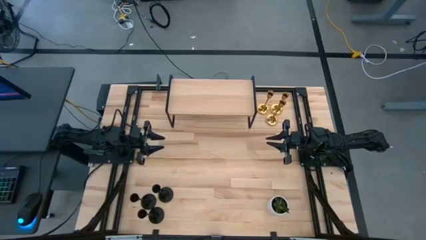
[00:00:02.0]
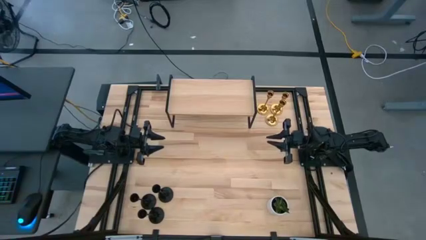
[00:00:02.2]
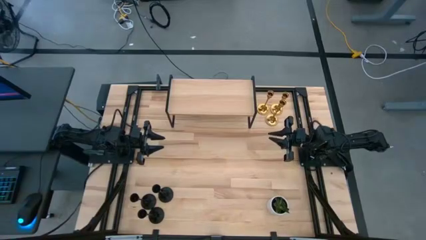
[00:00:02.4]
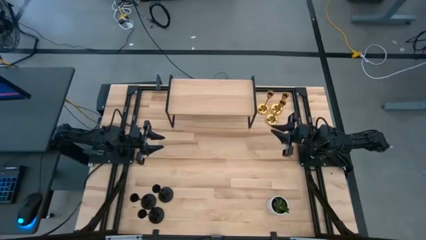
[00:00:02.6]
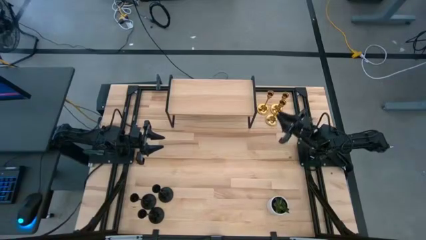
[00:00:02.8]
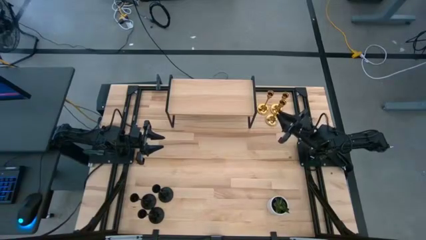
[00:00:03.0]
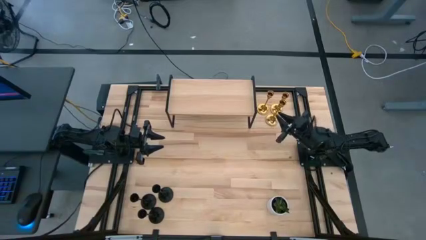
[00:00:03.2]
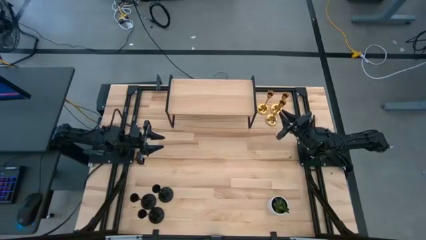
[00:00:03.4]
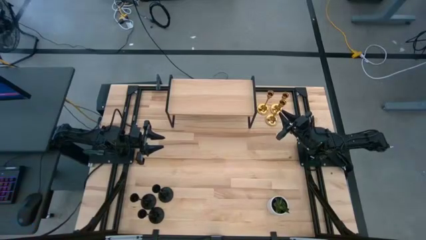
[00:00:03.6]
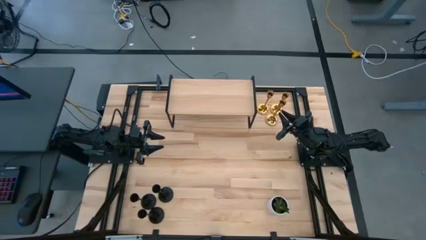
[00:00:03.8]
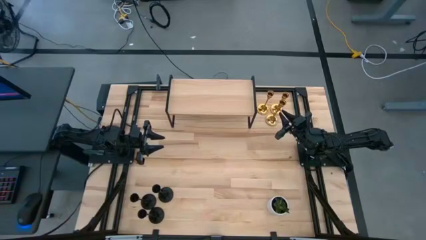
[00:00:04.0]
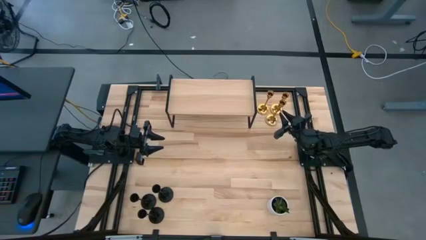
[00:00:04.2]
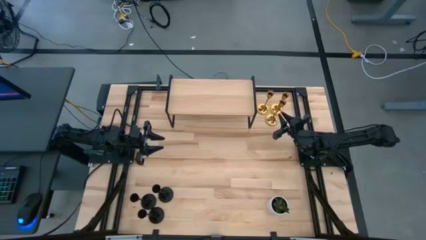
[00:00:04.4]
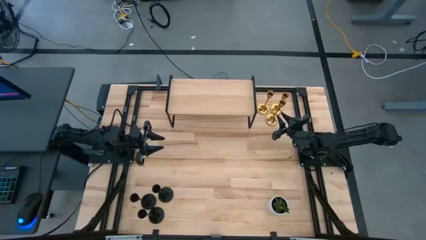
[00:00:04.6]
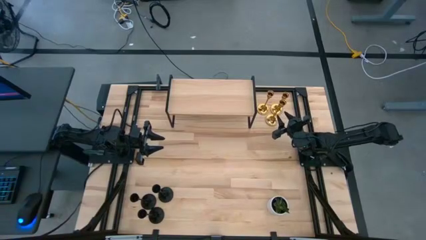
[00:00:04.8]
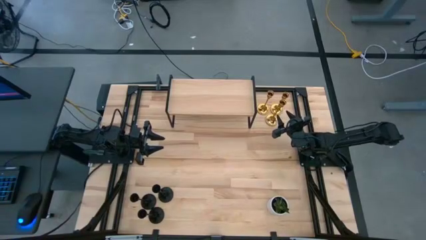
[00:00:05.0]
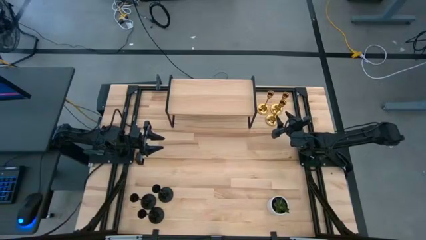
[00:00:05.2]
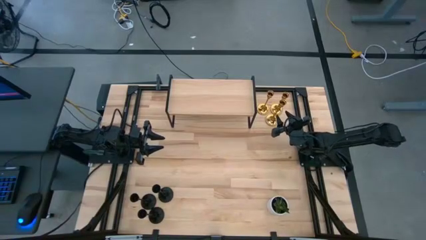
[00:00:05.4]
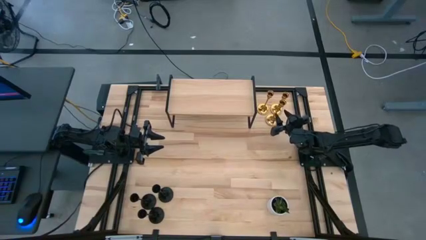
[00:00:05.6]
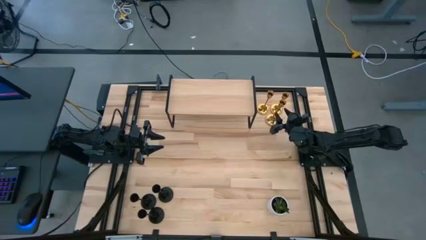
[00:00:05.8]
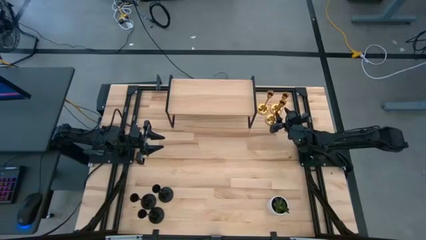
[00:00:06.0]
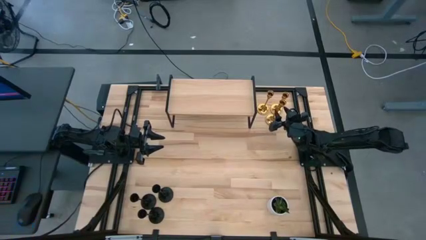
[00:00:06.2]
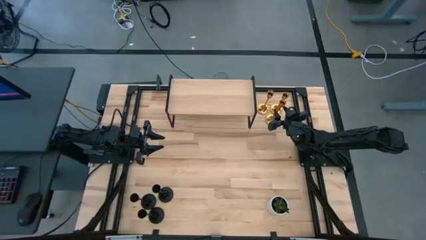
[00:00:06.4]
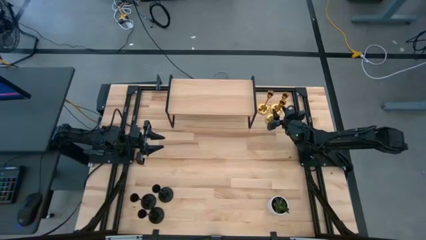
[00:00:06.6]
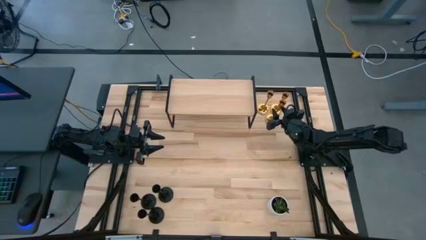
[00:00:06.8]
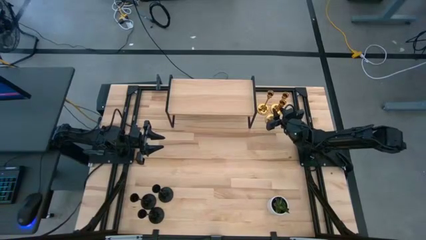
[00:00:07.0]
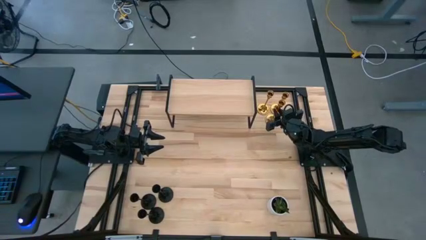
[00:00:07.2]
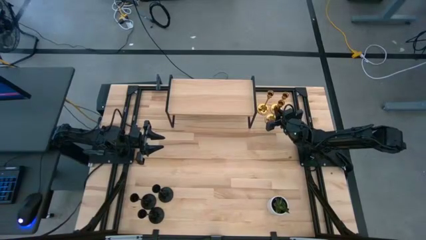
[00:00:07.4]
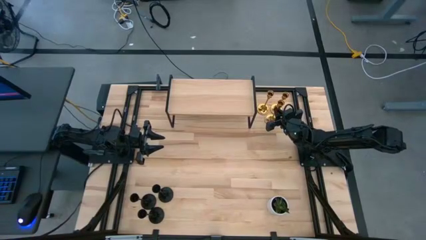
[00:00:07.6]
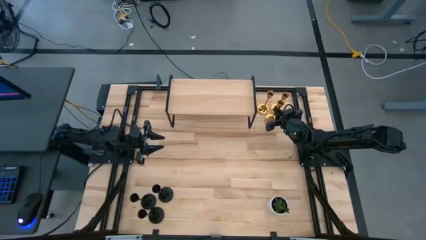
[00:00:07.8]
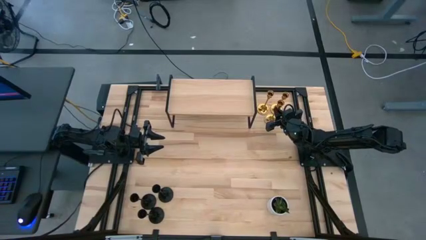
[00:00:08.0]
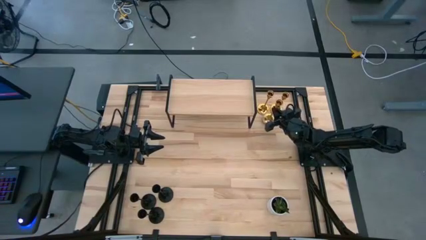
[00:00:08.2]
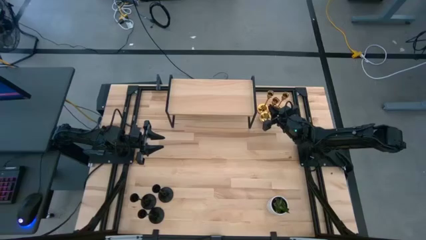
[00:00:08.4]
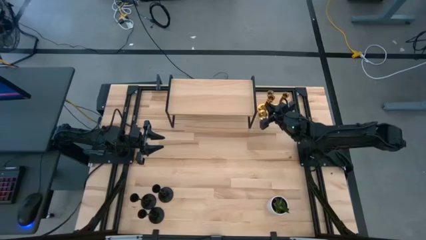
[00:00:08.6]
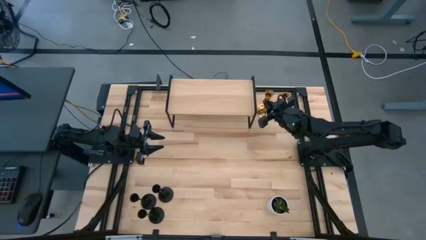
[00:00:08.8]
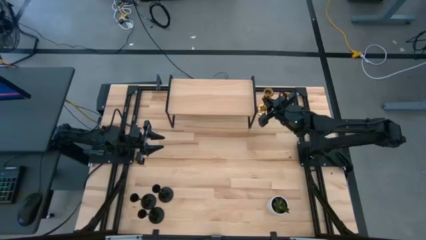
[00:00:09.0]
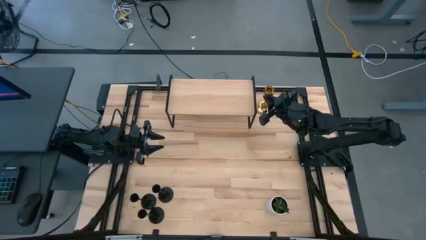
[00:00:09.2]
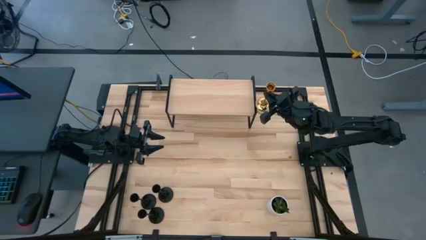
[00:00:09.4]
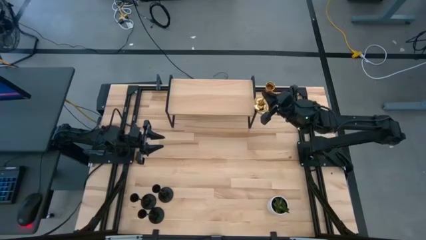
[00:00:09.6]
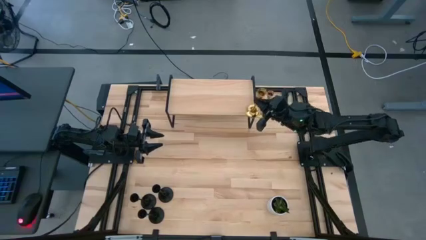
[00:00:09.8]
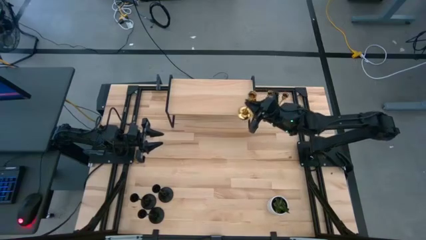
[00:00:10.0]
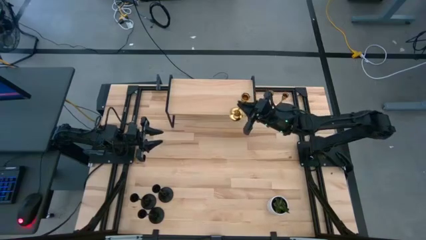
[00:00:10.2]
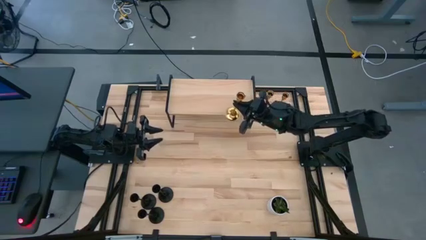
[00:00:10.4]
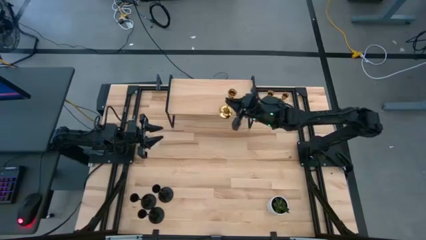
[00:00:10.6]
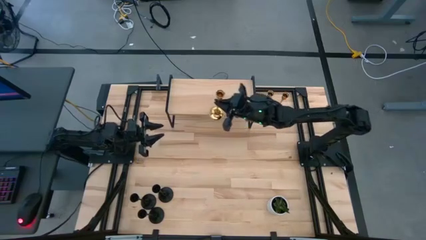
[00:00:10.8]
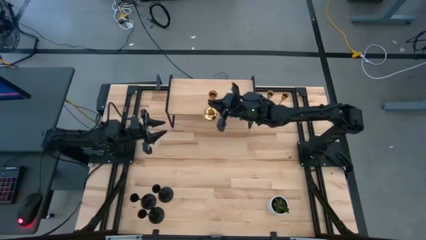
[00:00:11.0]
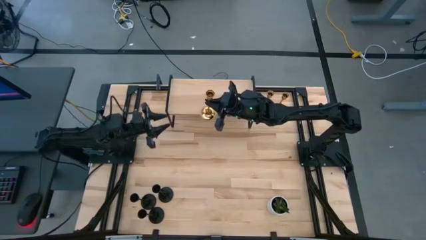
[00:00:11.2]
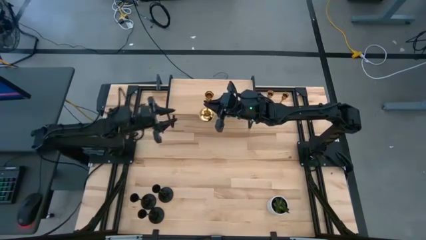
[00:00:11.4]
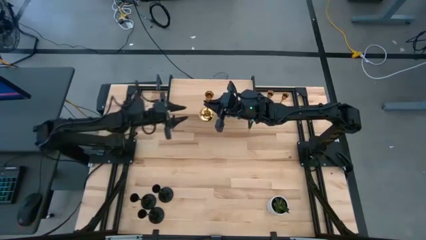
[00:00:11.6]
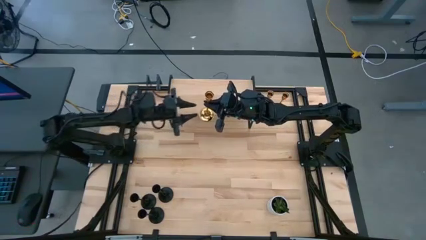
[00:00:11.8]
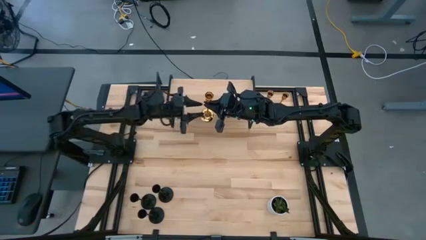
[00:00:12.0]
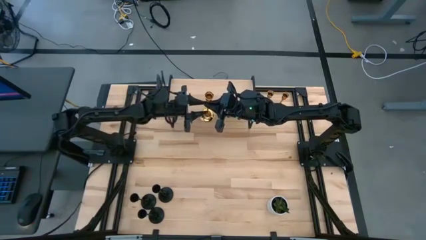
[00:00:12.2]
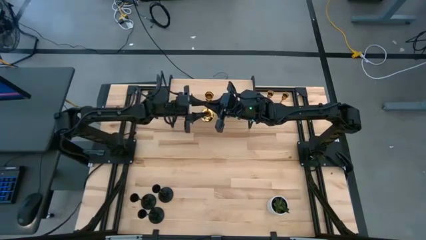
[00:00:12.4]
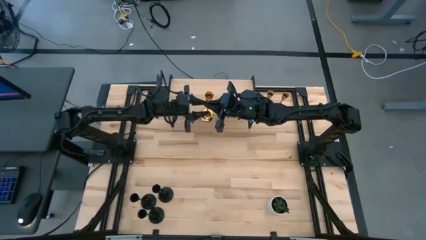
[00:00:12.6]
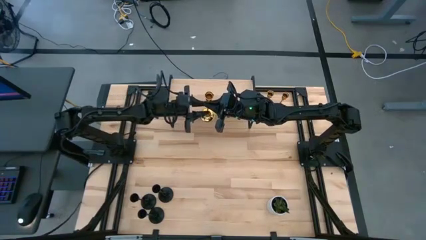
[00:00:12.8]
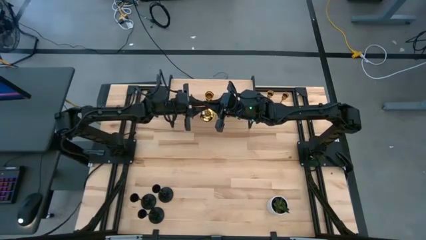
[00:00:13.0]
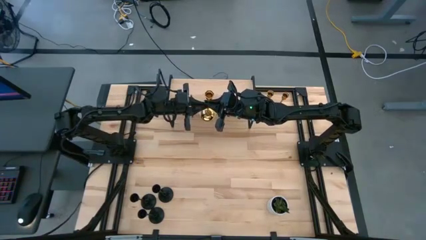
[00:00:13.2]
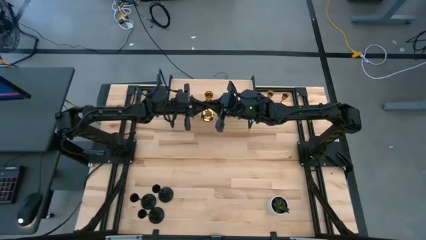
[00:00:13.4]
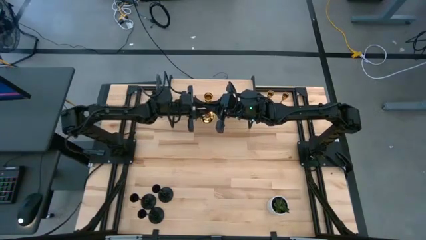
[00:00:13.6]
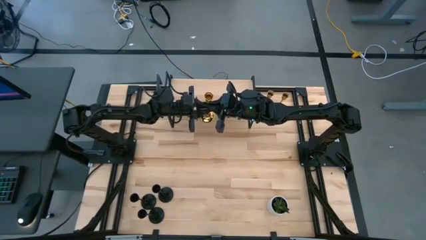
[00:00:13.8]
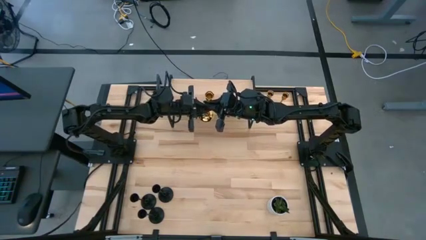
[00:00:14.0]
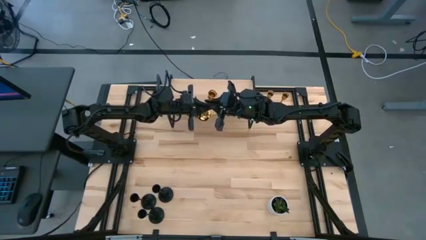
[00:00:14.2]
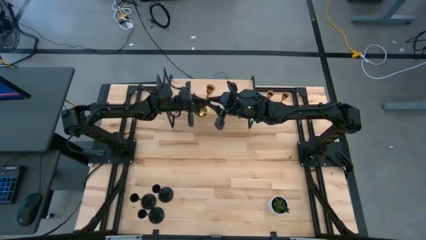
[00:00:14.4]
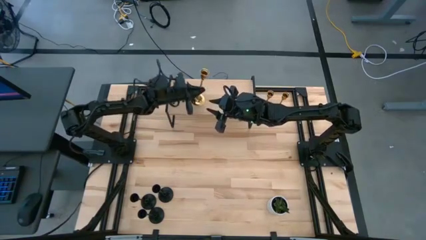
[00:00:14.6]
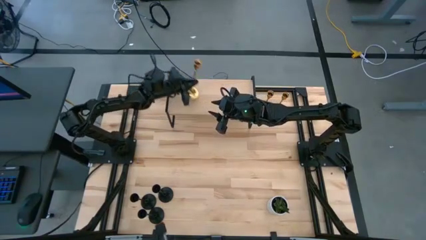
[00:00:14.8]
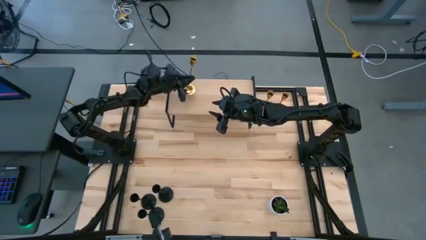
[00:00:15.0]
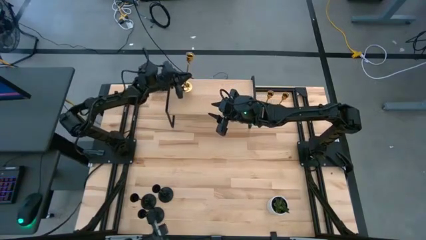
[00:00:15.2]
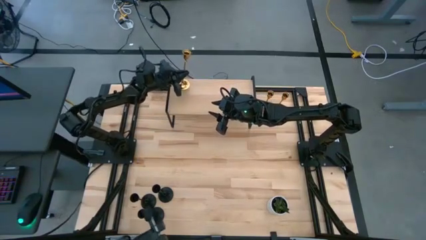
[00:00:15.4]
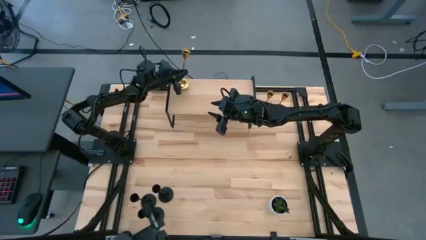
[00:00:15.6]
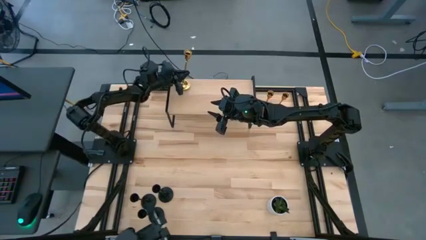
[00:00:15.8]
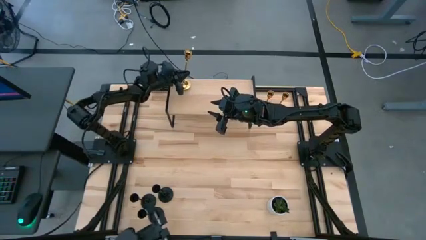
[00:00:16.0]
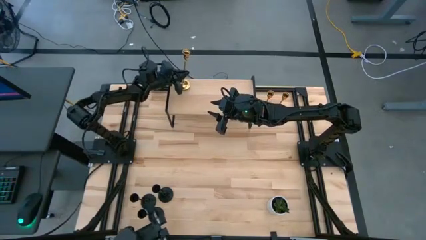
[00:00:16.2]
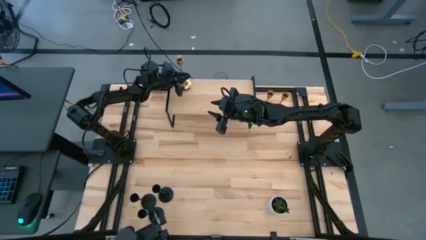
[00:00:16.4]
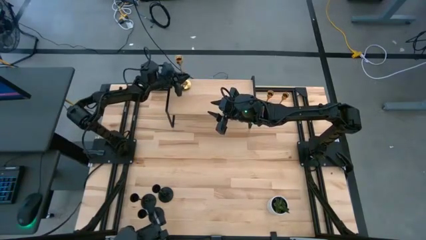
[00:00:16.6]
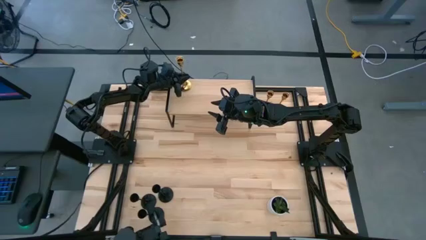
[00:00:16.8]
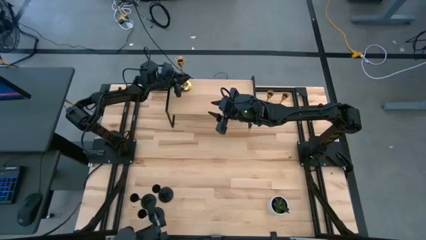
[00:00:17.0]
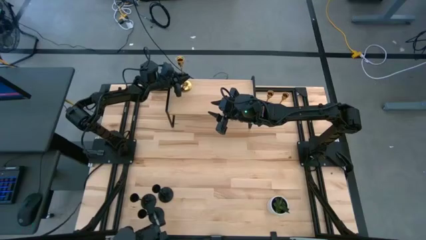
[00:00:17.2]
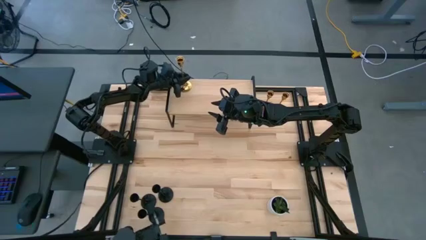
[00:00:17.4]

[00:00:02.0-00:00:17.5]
Task: Pick & Place candle stick holders
Put the bottom gold candle holder on the shelf
